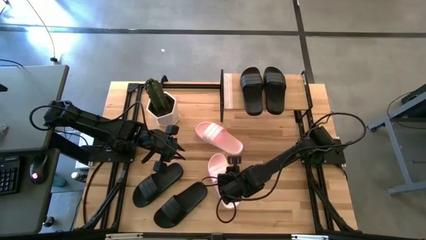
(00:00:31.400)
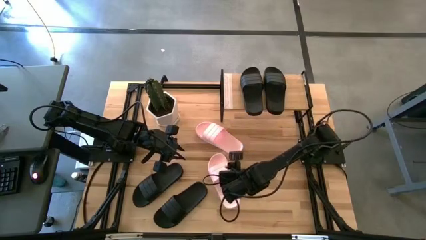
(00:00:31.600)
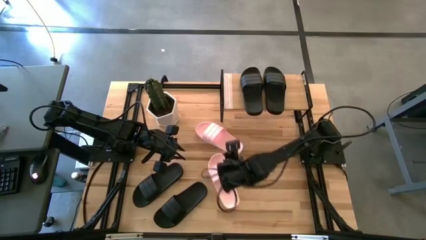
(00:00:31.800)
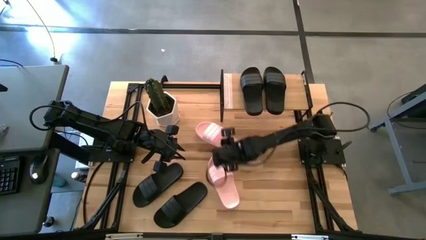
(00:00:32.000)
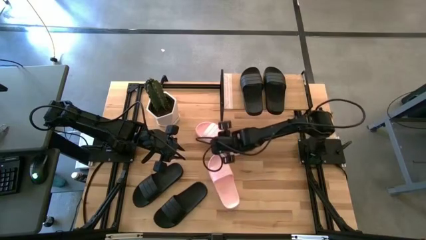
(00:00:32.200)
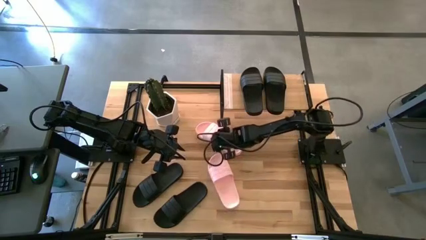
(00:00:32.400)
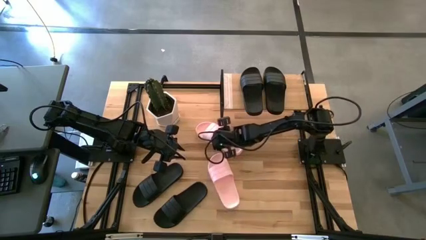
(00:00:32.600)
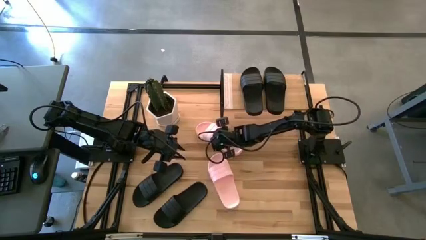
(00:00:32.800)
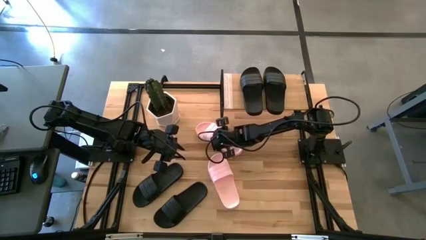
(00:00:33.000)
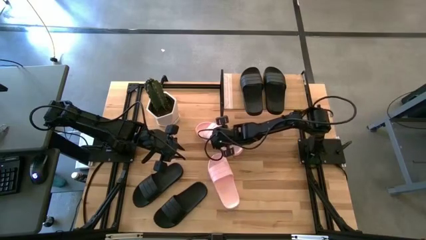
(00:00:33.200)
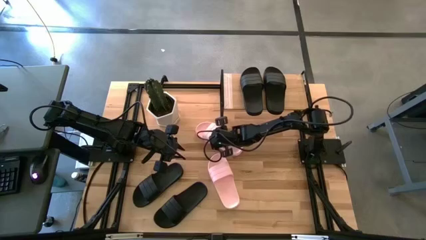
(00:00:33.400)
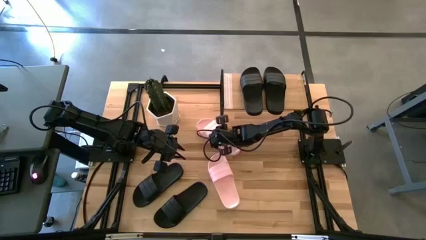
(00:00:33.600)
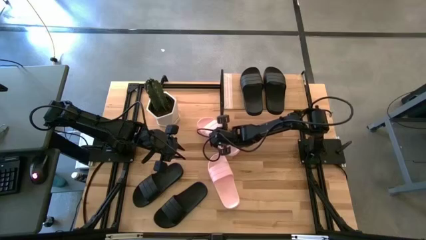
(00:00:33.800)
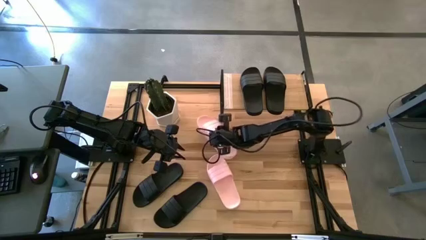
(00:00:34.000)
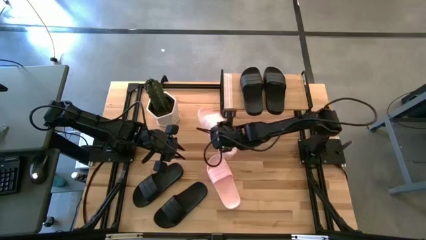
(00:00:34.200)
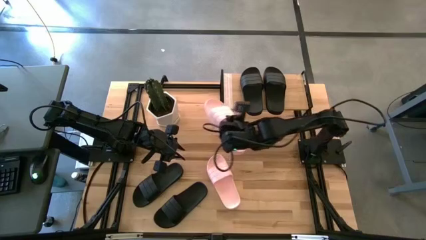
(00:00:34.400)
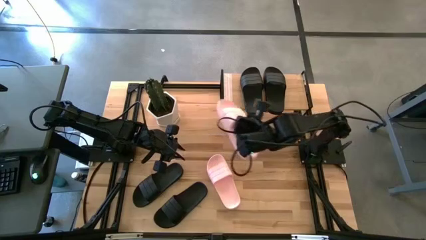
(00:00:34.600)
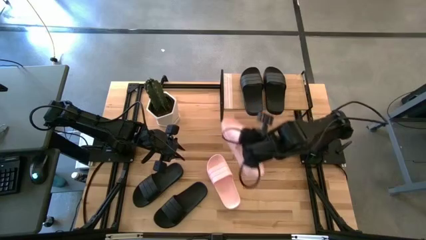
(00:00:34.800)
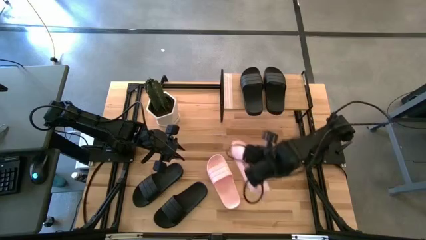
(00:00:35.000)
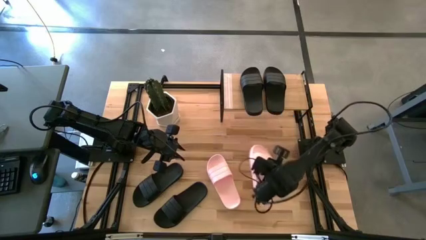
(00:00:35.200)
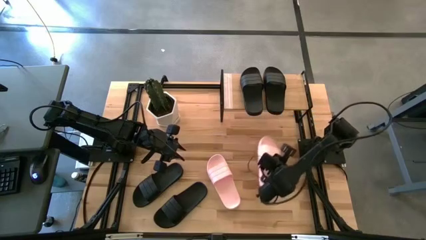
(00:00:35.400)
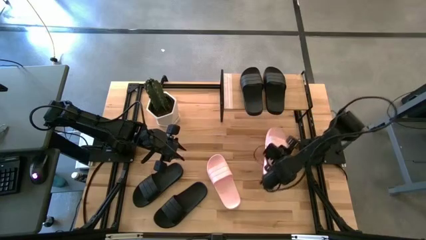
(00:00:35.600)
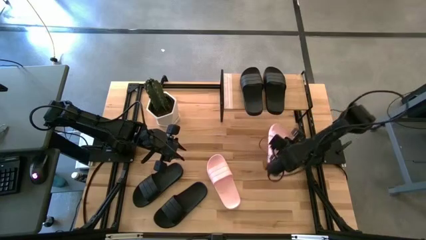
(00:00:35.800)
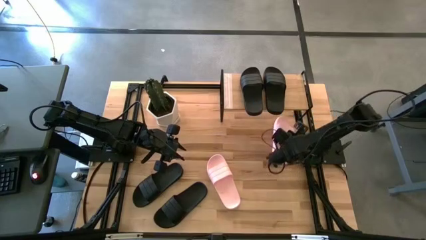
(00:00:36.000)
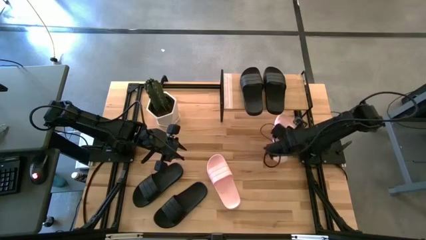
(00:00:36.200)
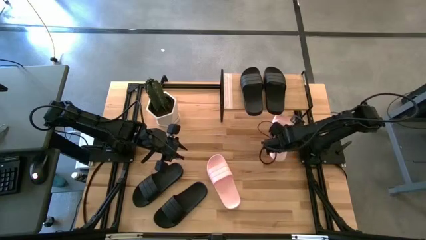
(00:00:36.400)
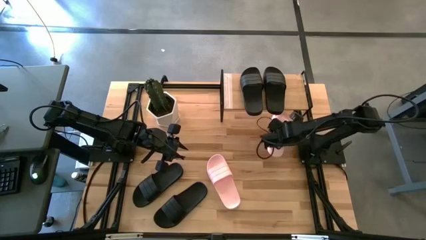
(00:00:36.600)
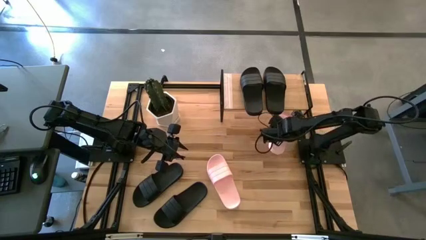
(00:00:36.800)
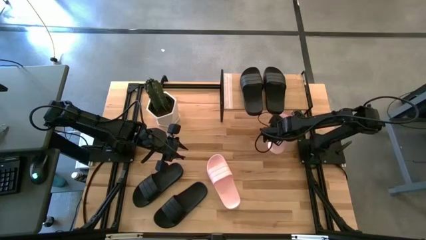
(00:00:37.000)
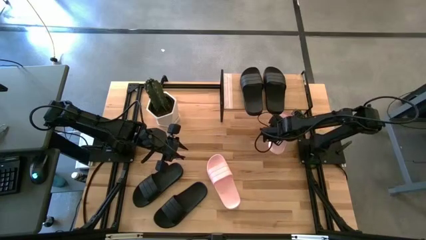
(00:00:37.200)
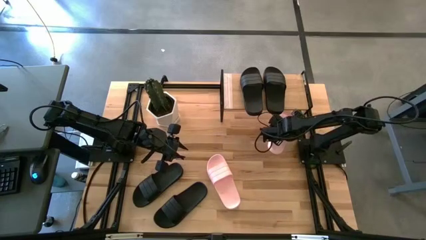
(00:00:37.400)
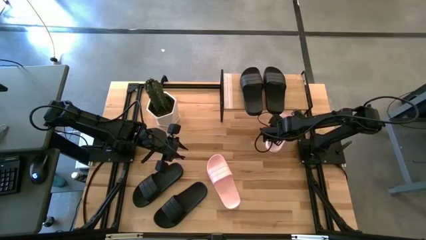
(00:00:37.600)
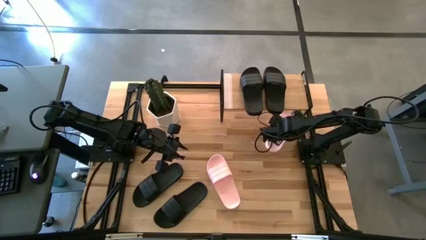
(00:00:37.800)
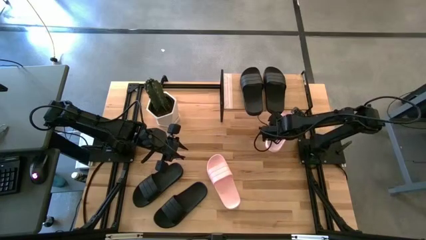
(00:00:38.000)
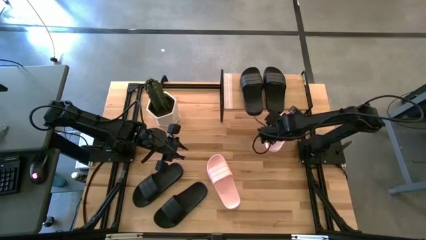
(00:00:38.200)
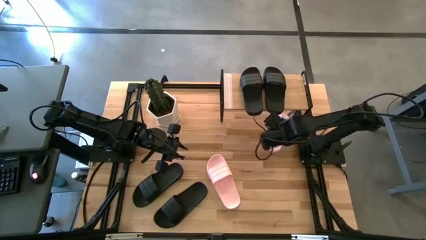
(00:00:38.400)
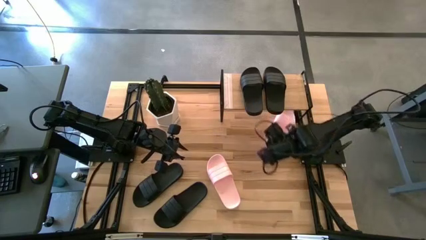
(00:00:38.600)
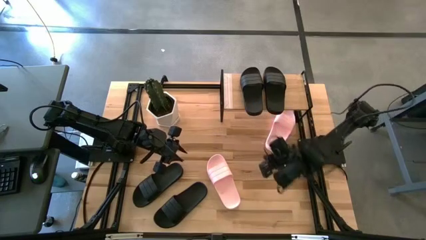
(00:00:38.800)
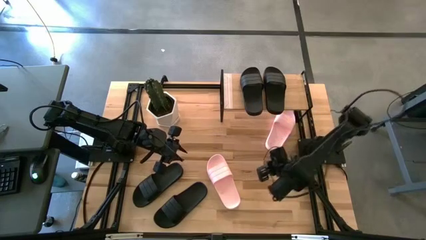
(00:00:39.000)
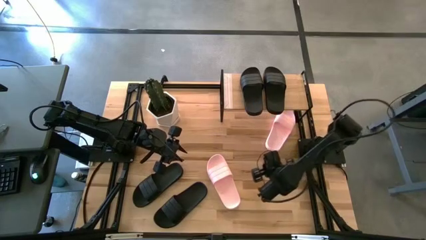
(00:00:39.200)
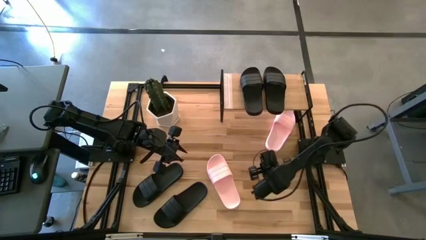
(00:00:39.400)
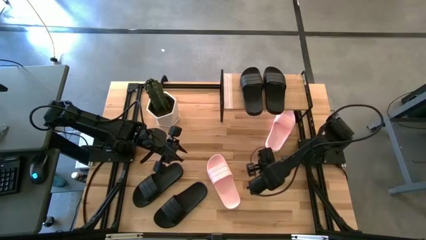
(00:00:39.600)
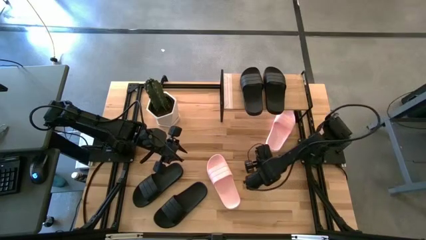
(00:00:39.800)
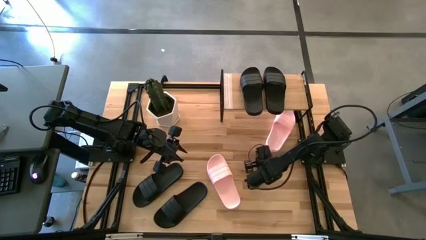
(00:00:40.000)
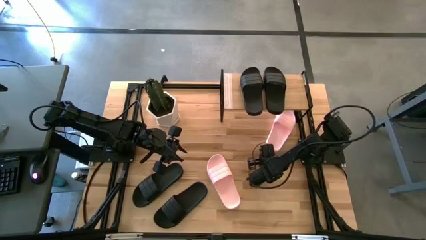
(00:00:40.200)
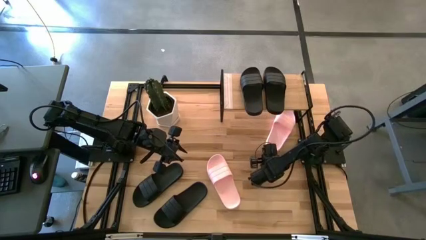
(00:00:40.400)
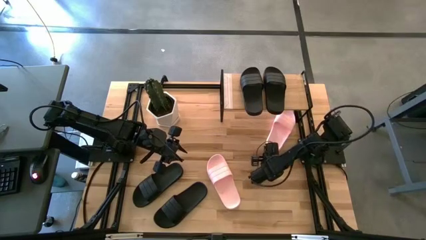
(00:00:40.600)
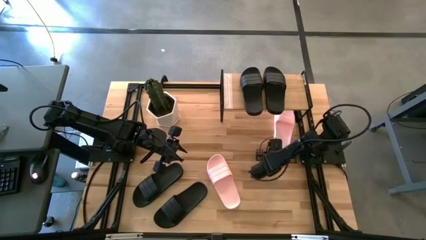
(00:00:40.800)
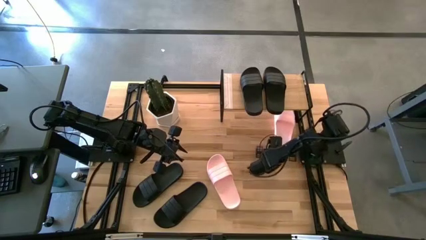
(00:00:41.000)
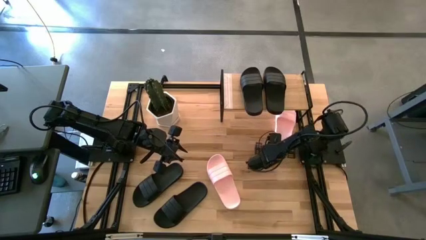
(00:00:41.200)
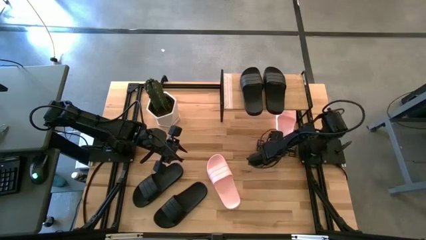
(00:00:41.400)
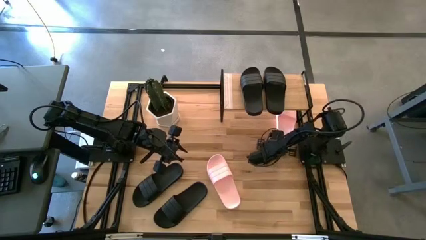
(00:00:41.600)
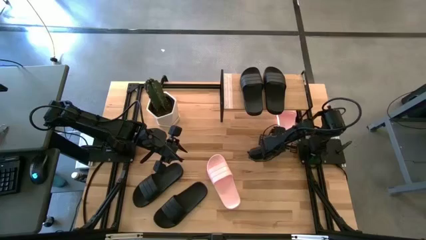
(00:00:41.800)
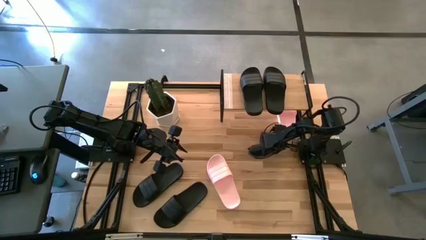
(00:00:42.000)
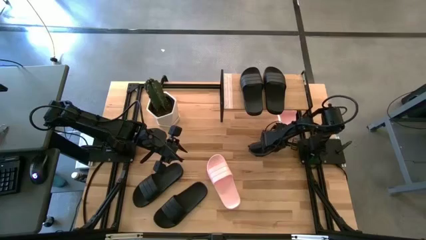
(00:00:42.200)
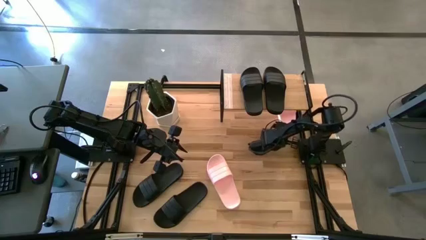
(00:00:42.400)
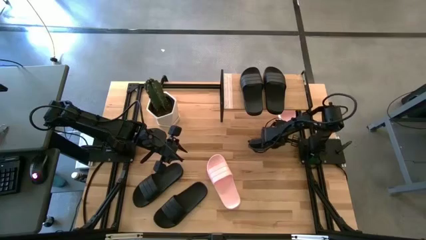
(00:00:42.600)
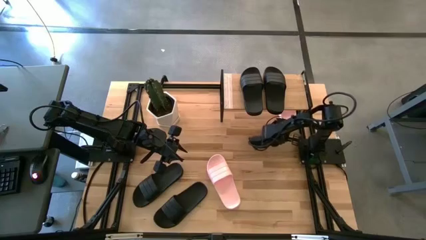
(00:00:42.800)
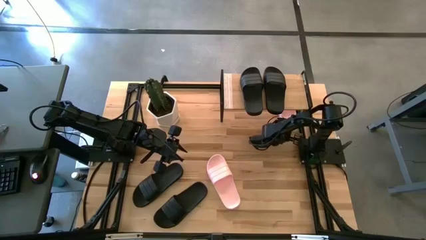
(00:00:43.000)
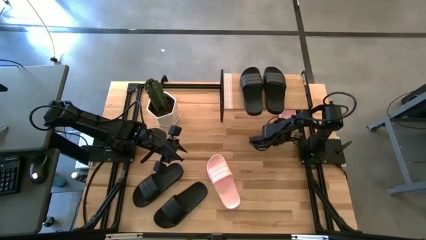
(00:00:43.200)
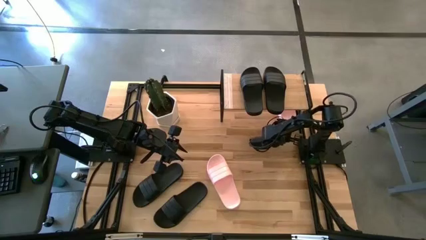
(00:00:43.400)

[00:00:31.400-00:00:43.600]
Task: Pick and place slides into the shelf
Put the pink slipper under the shelf

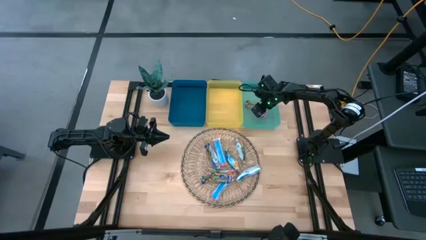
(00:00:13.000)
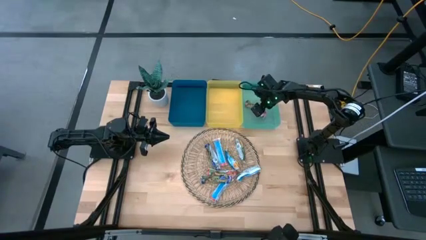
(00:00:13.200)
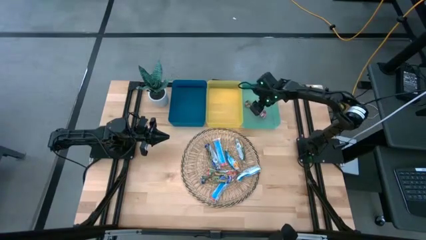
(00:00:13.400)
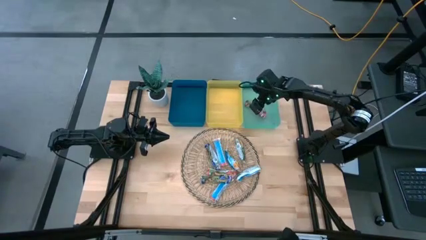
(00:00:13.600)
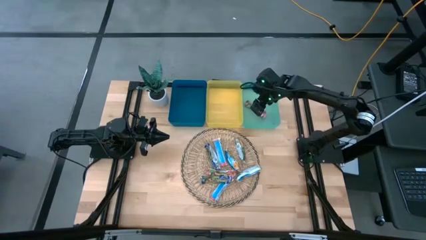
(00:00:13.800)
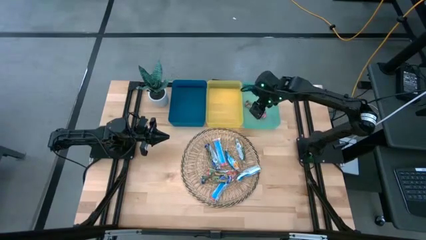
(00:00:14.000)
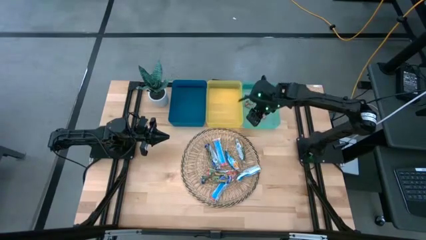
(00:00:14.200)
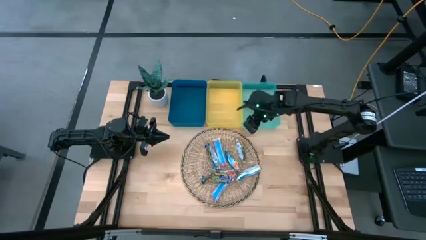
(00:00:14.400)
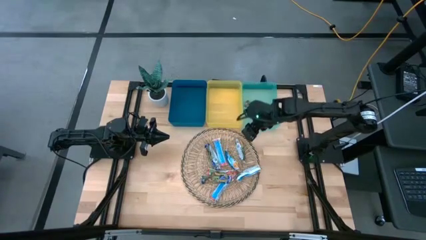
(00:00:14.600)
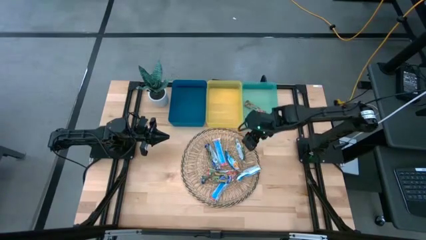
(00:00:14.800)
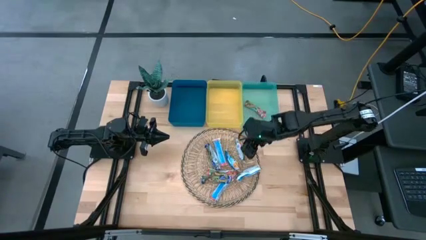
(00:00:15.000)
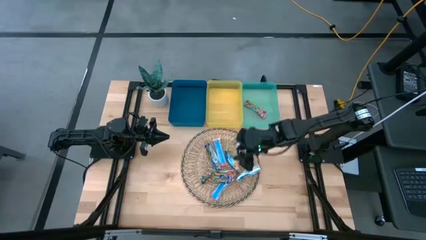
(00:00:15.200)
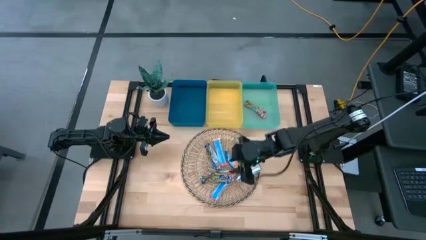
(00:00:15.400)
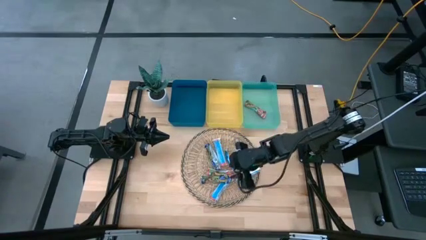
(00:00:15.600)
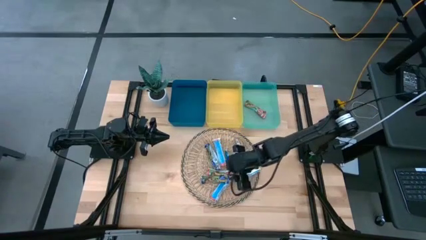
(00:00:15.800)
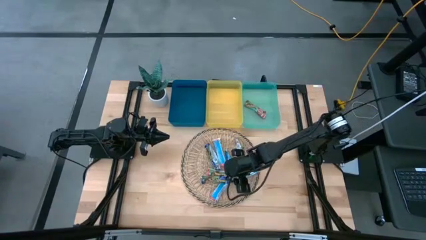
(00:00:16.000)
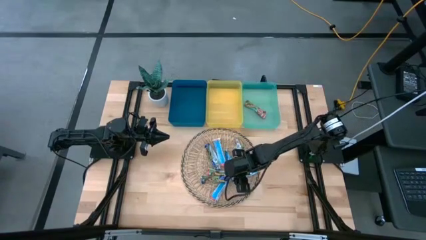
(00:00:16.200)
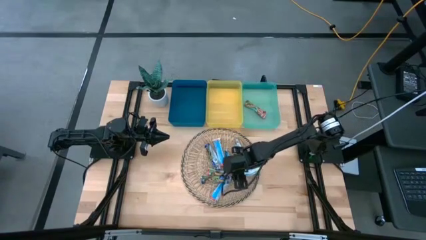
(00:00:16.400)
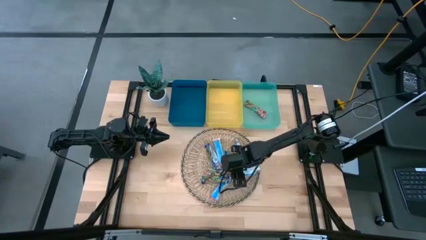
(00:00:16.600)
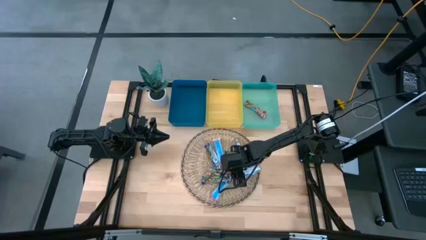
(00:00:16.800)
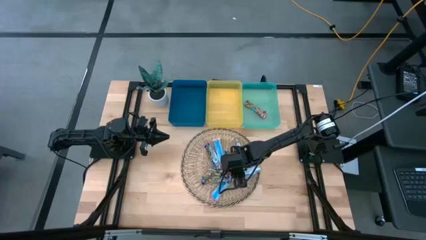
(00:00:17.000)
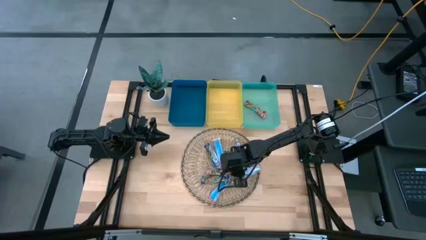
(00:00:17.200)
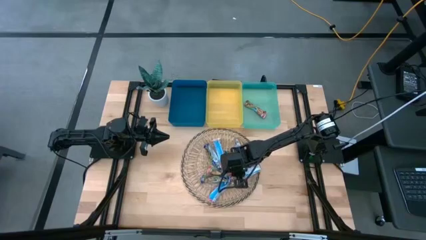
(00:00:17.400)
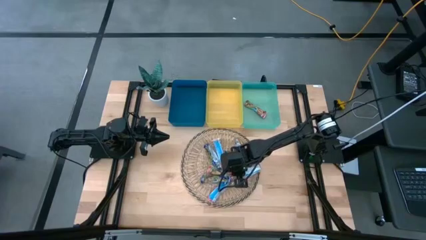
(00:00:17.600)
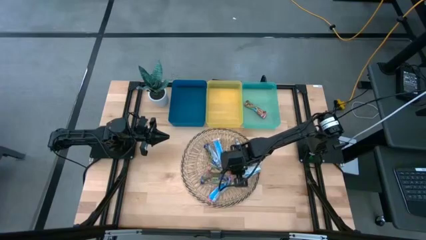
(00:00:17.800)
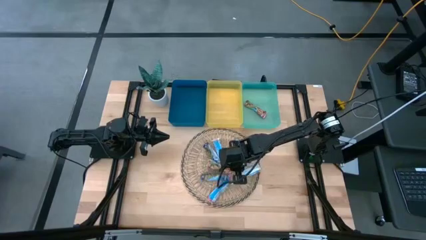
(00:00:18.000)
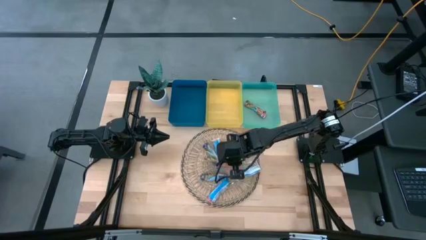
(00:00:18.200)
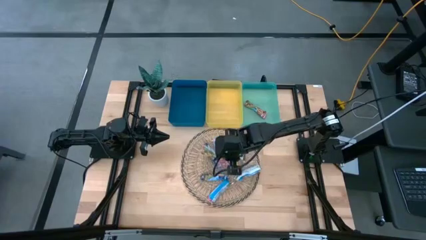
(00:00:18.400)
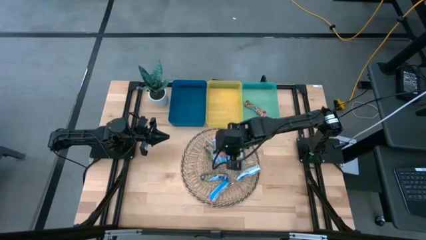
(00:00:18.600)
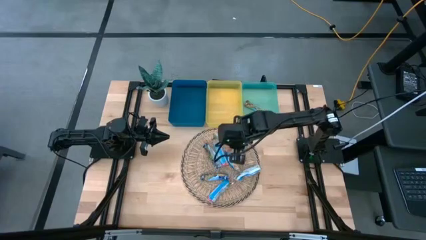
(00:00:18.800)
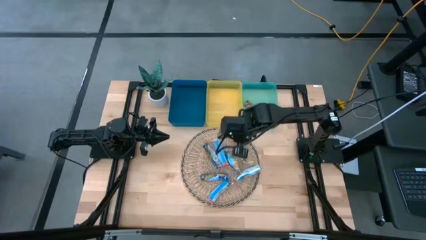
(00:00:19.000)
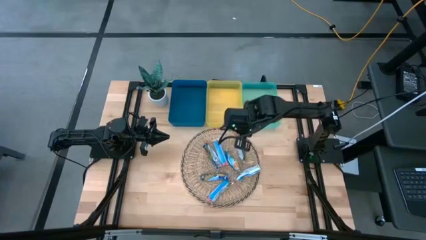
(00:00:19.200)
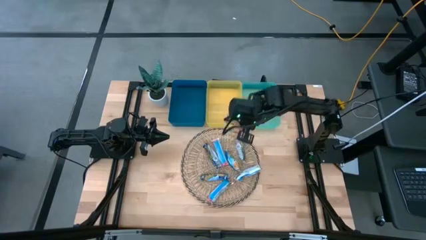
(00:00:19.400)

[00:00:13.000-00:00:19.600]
Task: Pick and place Granola Bars by type
Put the red granola bar into the green bin
